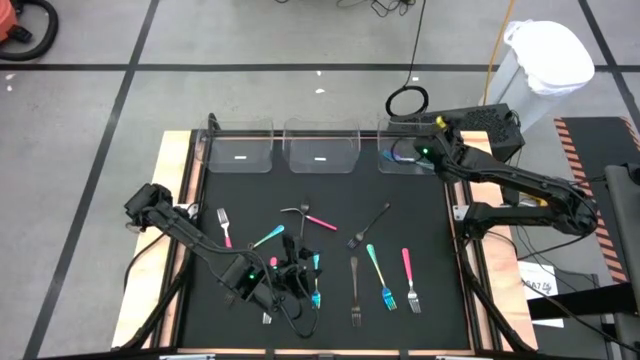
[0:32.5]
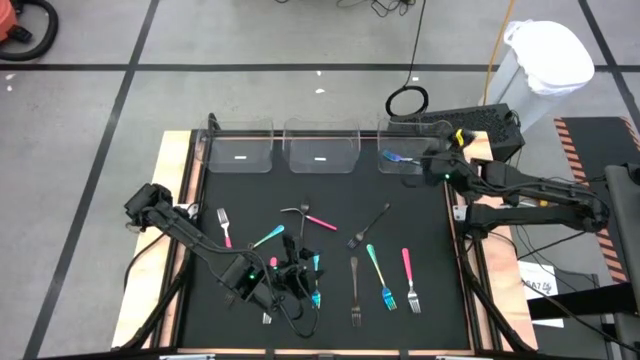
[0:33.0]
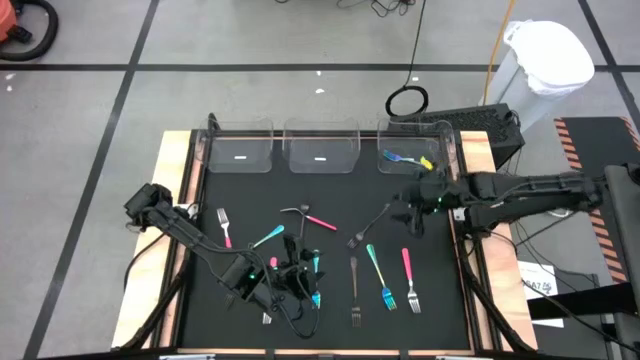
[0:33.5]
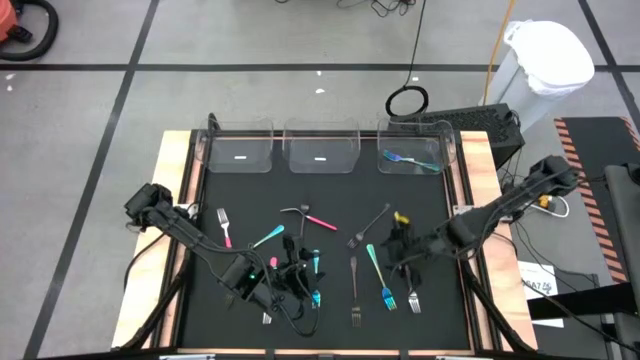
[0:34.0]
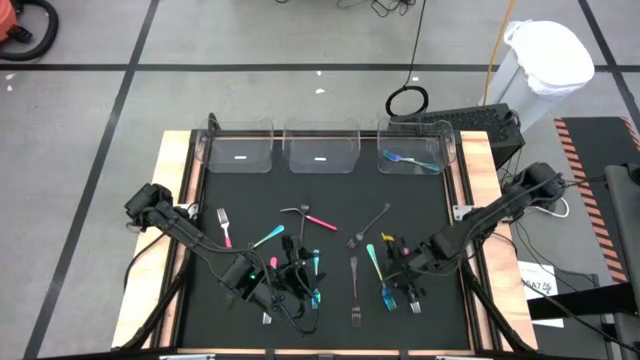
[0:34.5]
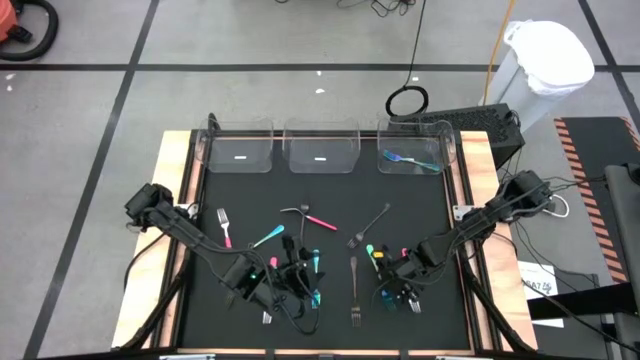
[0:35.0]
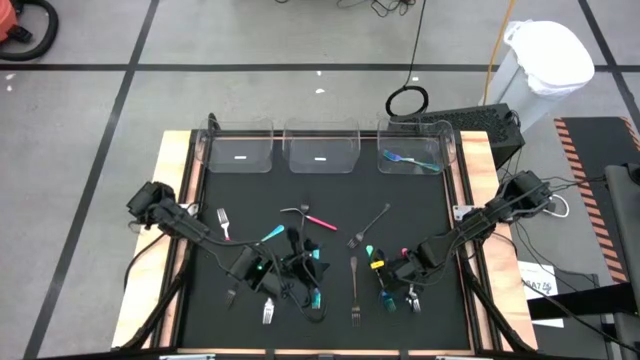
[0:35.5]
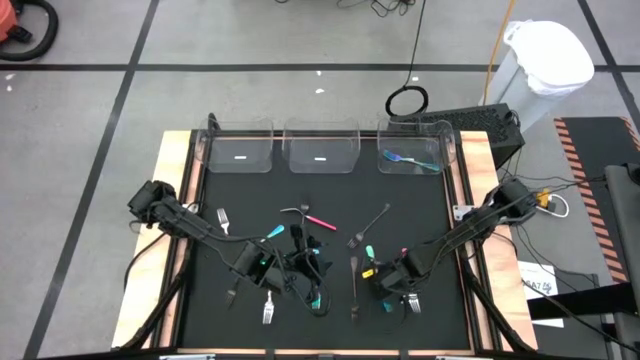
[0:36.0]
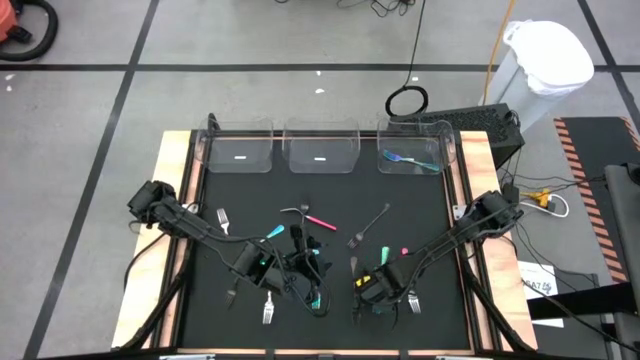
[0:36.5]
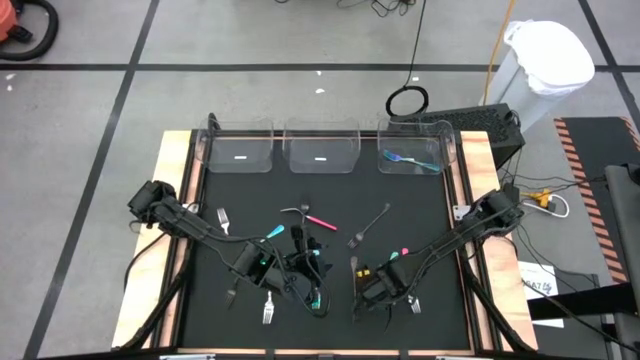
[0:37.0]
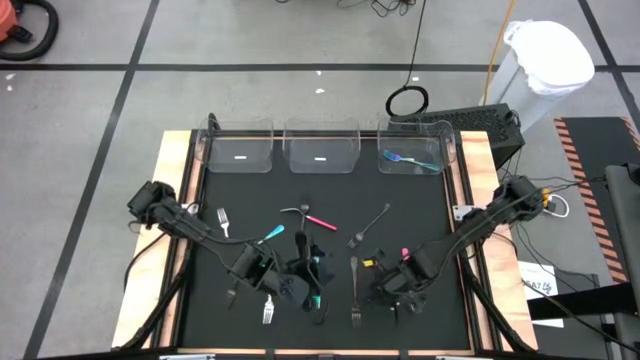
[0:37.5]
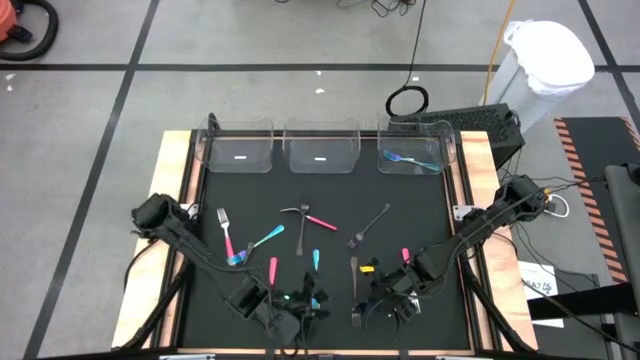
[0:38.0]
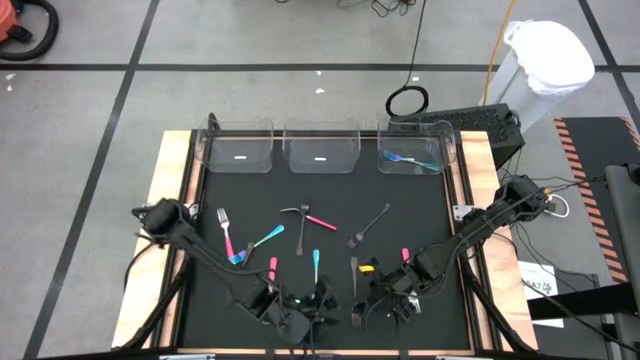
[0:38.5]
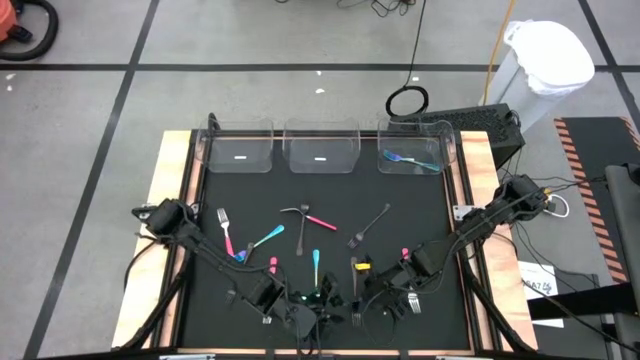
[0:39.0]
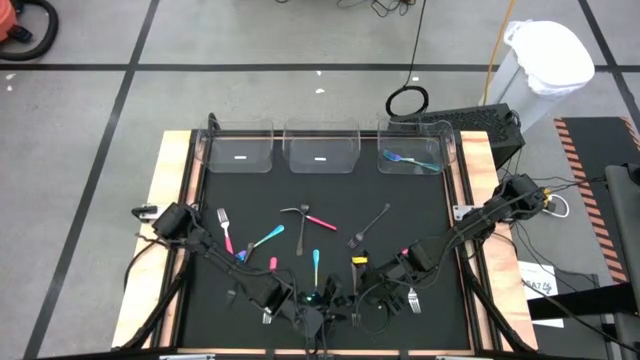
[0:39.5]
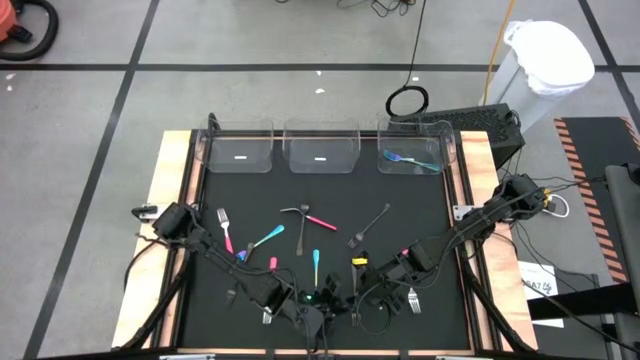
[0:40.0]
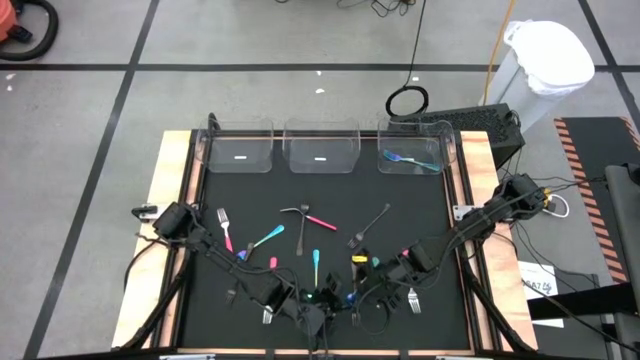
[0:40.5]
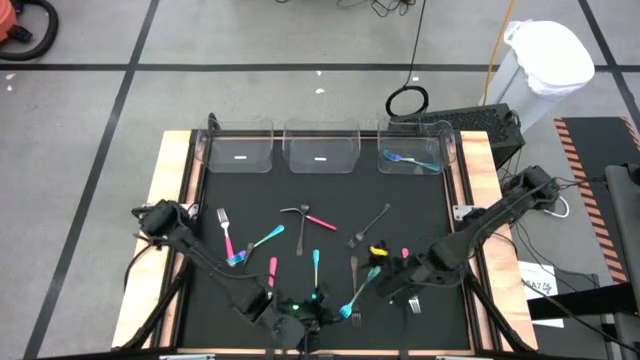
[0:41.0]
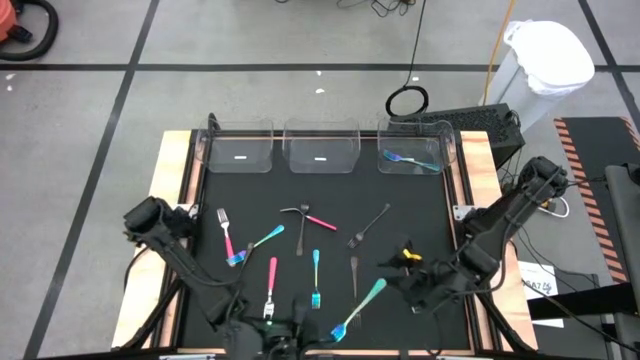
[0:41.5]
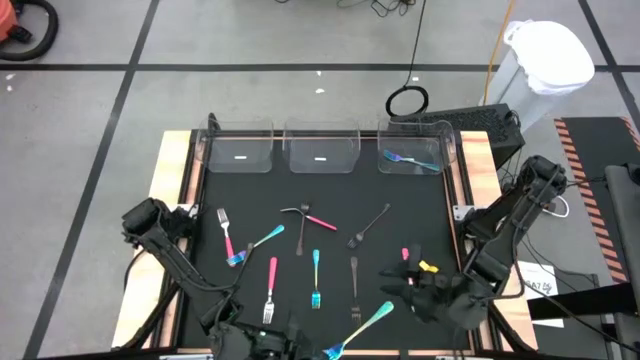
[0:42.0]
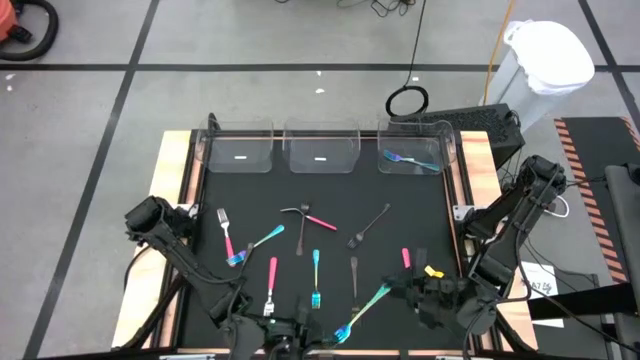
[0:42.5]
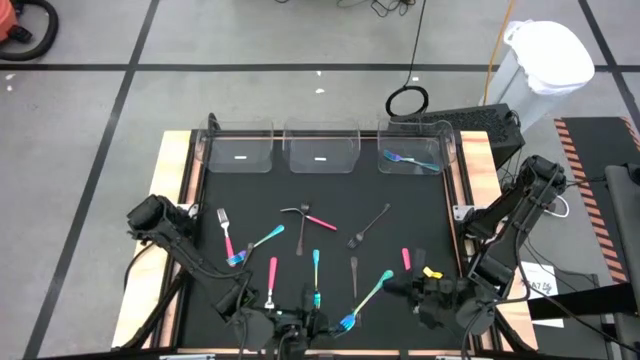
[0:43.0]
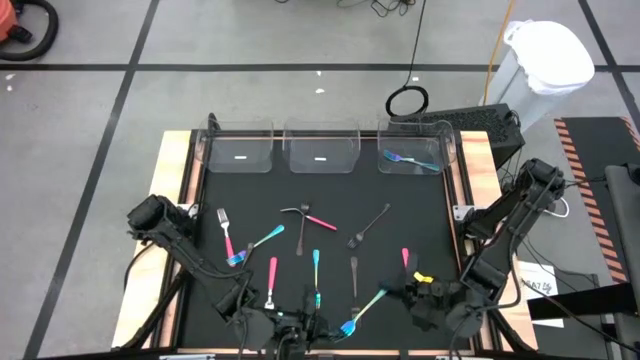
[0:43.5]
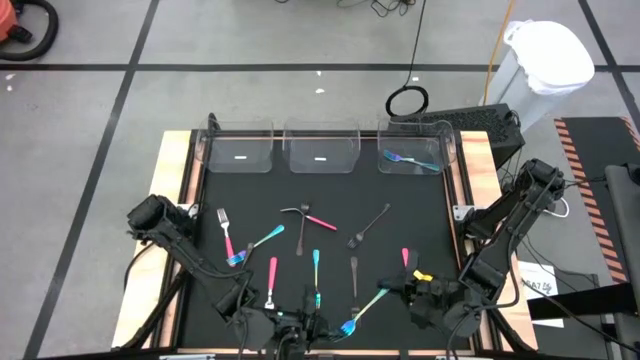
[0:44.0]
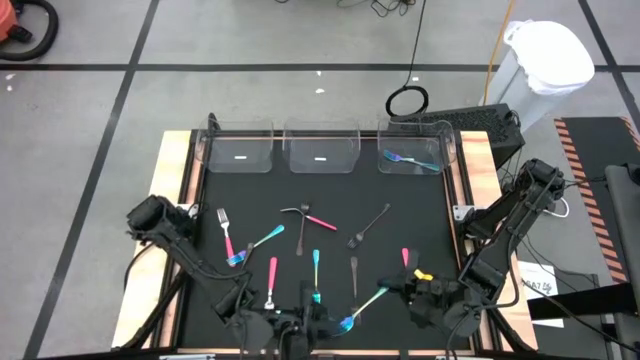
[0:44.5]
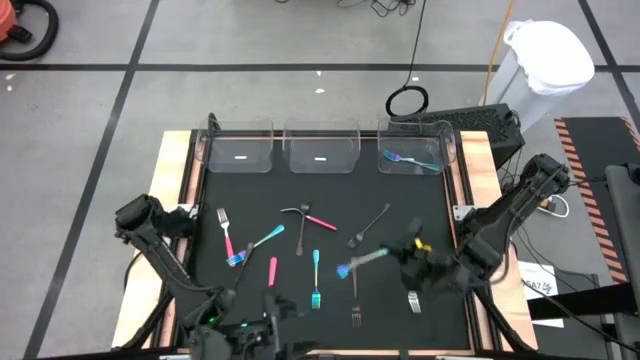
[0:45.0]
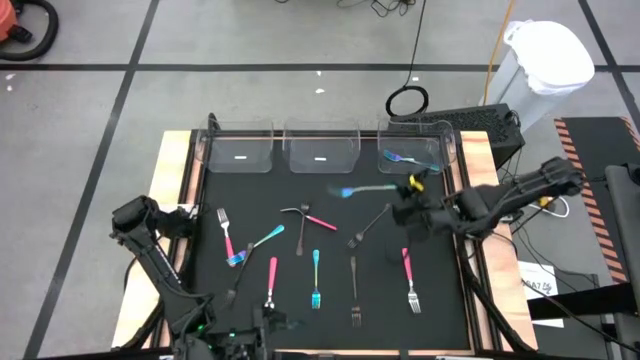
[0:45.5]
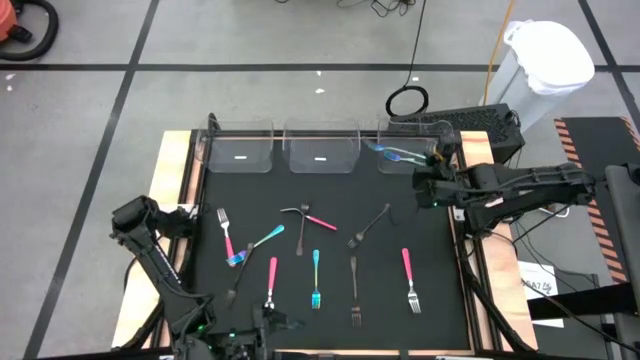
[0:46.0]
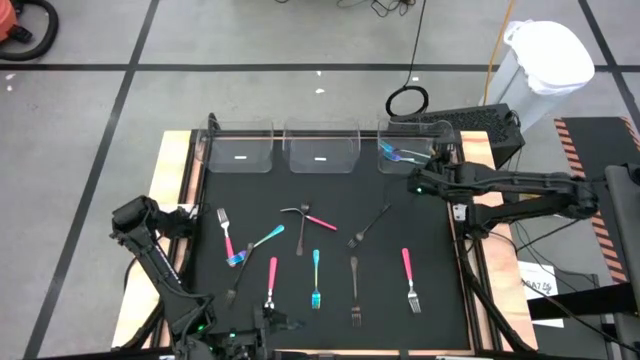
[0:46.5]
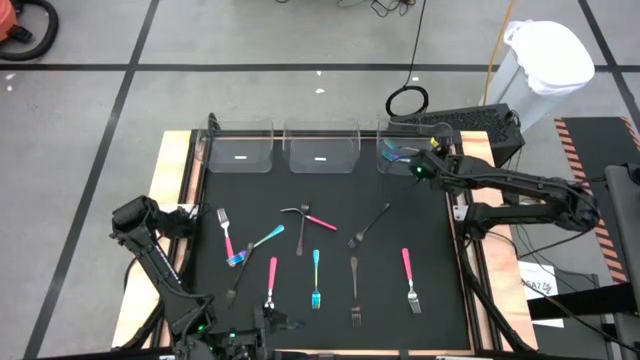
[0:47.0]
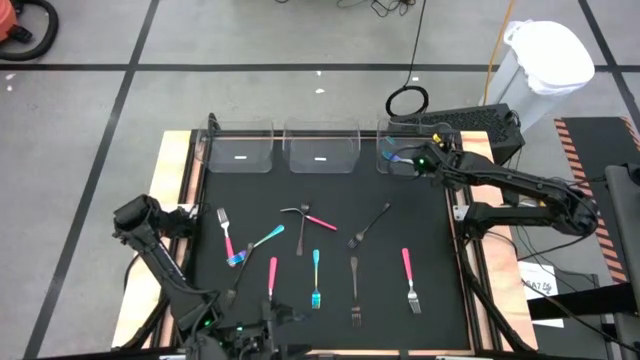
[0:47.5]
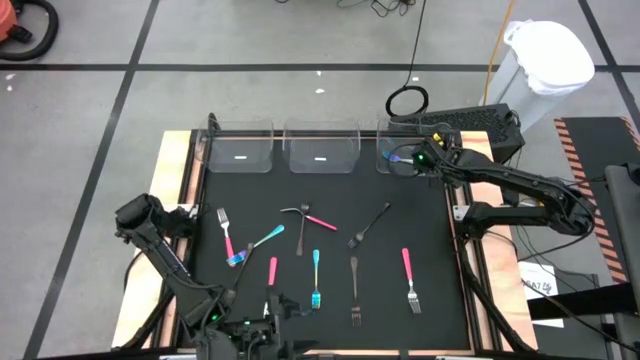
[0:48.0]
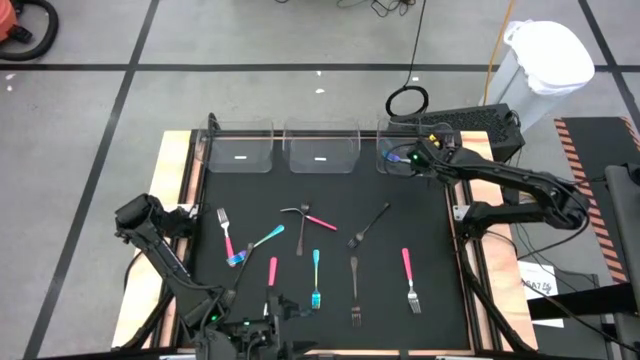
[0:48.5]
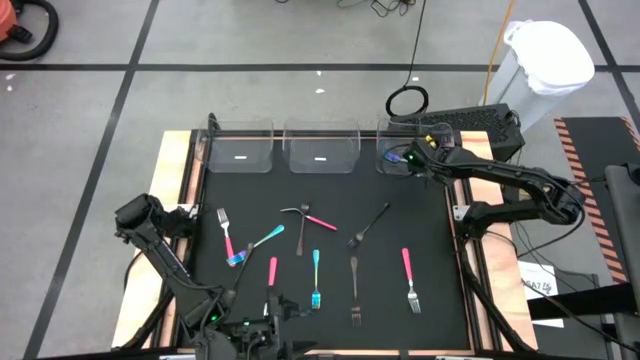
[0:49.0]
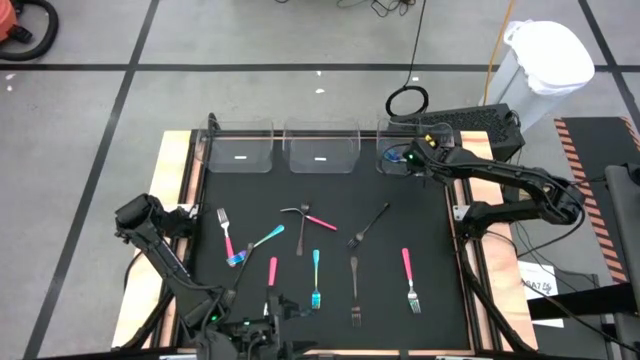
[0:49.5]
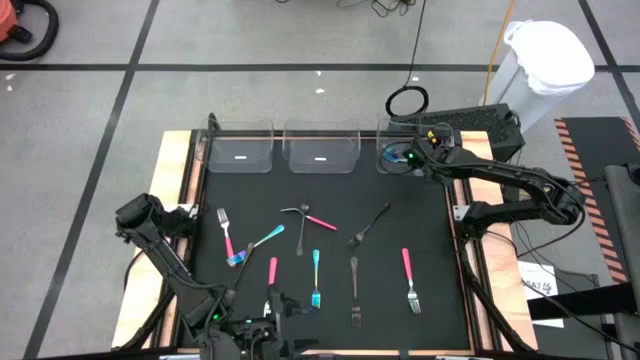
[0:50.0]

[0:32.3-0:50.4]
Task: Sort silverware by color (type)
Put the blue fork into the right transparent bin

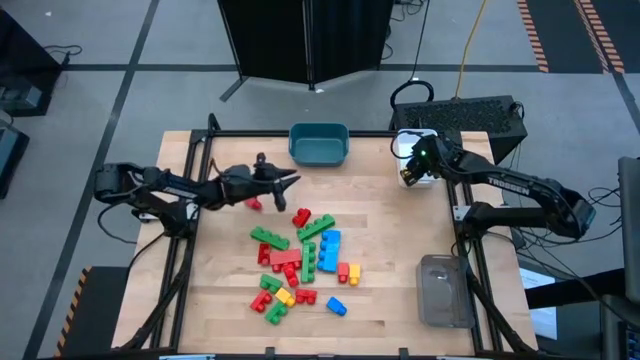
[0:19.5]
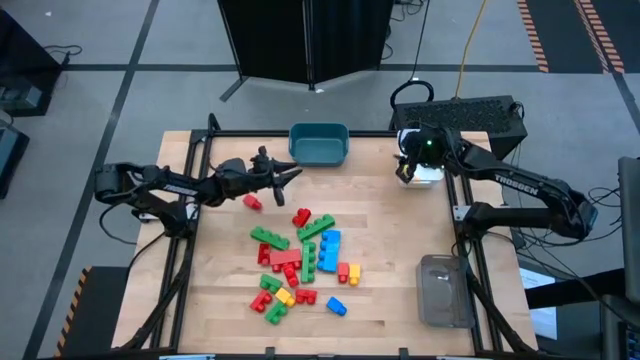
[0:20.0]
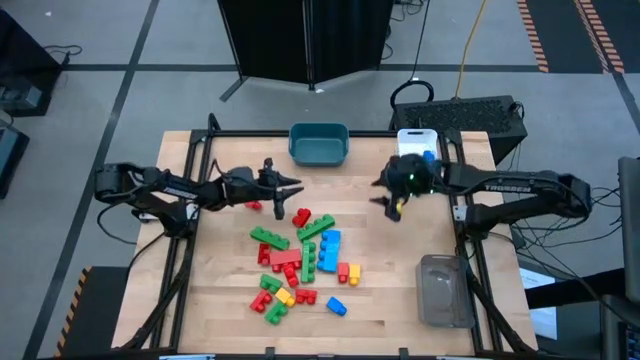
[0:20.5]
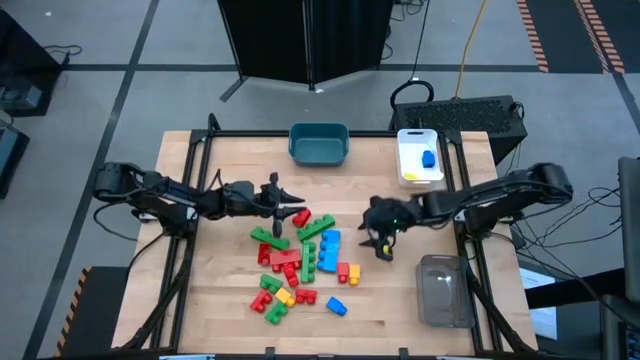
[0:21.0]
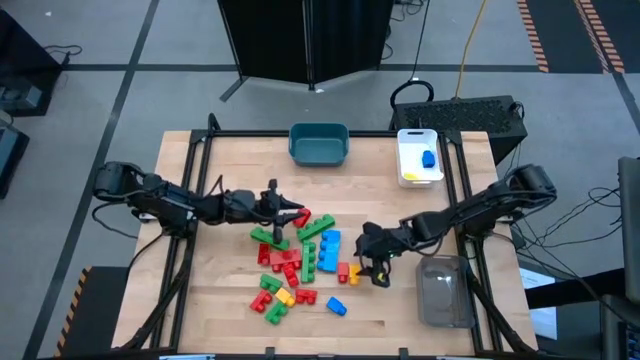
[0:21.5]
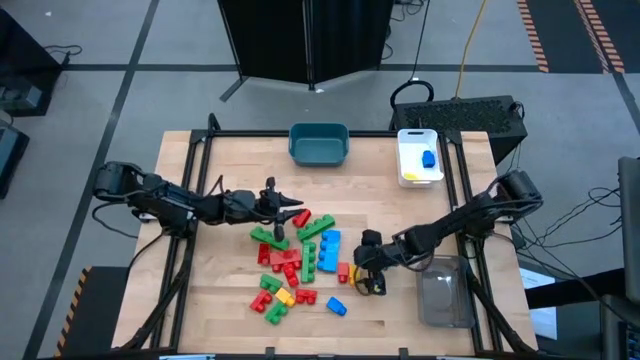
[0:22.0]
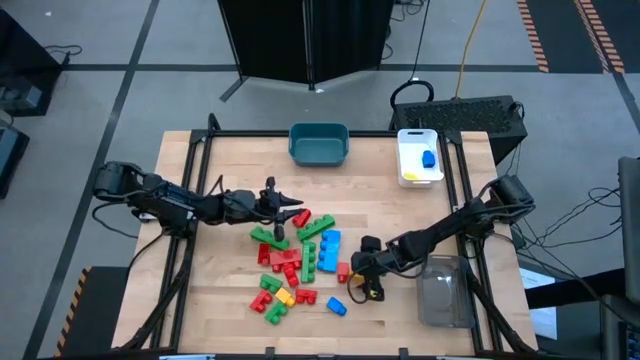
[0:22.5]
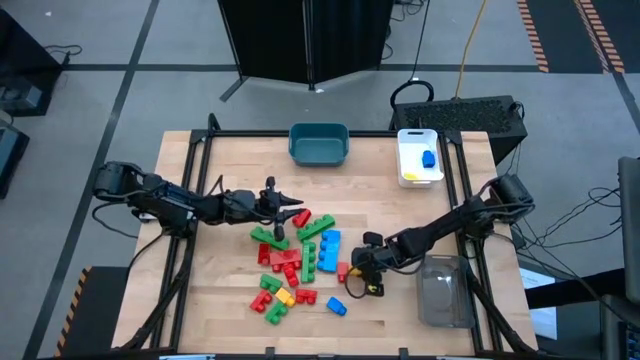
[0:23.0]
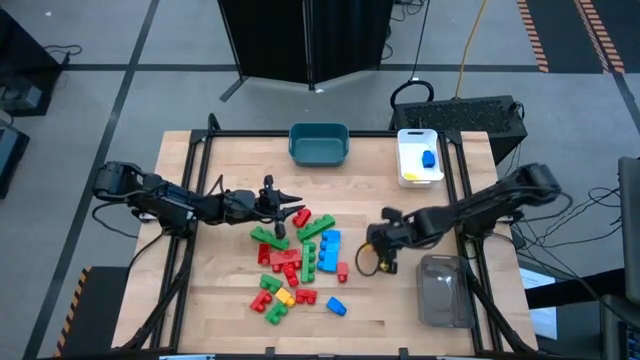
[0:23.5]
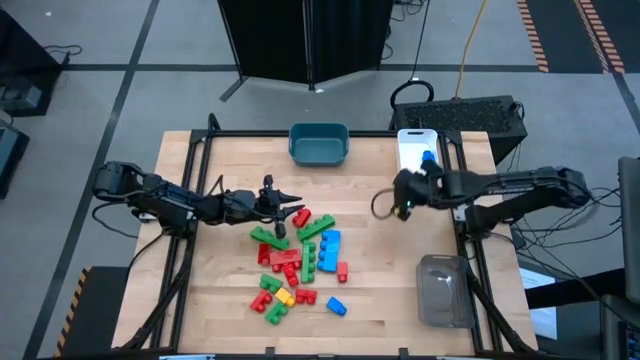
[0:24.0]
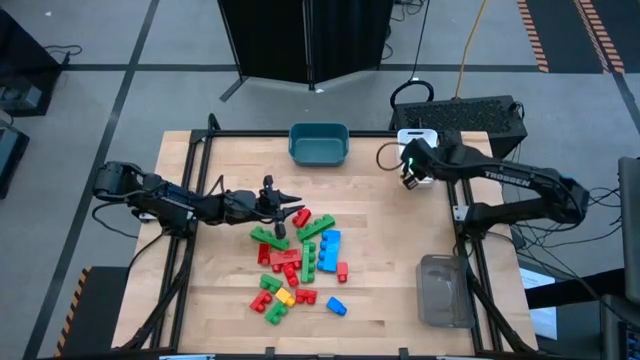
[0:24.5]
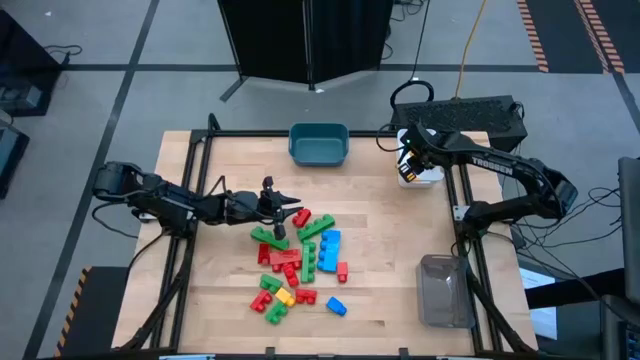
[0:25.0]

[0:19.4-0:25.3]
Task: Sort blocks by size
Put the one stud yellow game piece into the white bin
